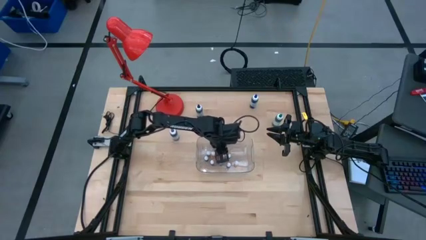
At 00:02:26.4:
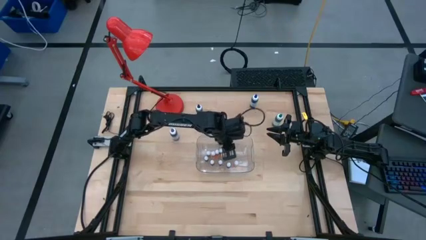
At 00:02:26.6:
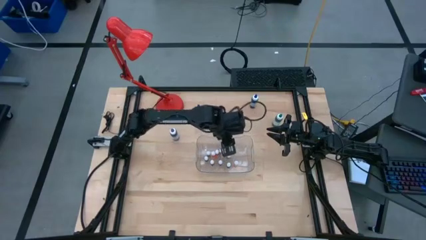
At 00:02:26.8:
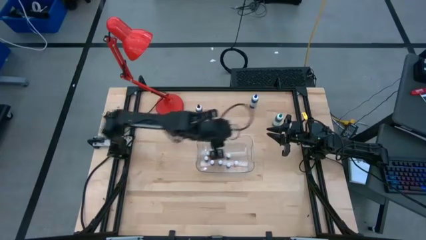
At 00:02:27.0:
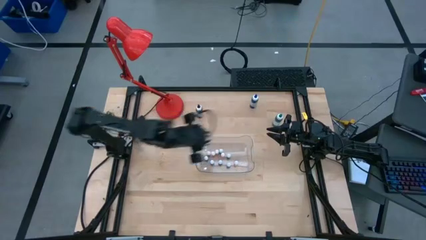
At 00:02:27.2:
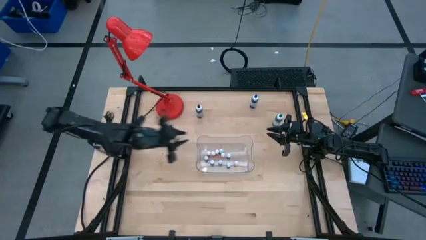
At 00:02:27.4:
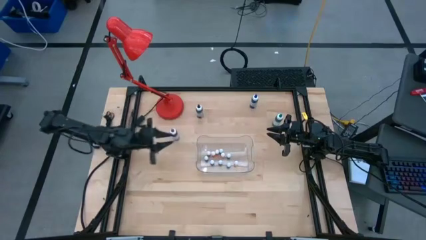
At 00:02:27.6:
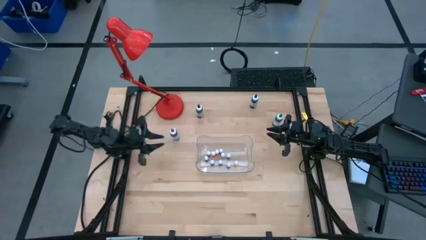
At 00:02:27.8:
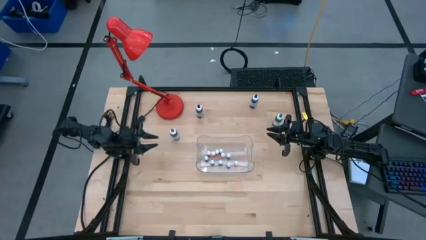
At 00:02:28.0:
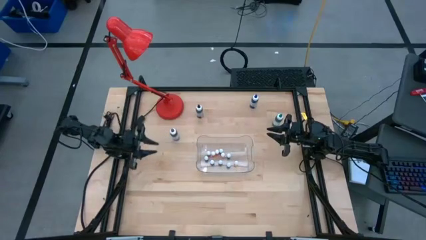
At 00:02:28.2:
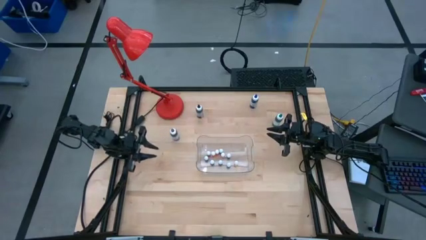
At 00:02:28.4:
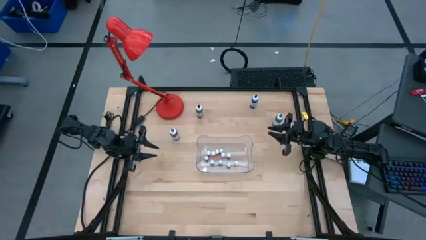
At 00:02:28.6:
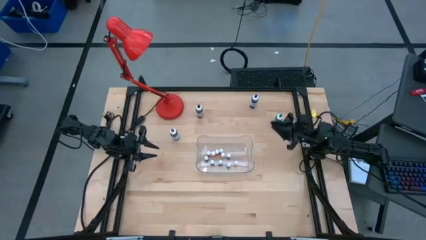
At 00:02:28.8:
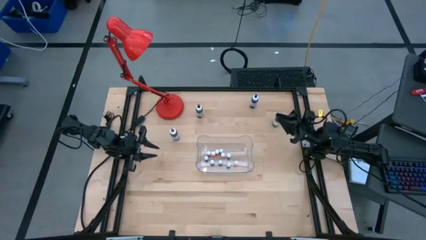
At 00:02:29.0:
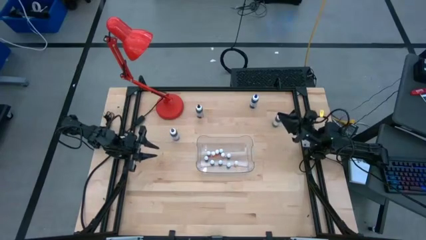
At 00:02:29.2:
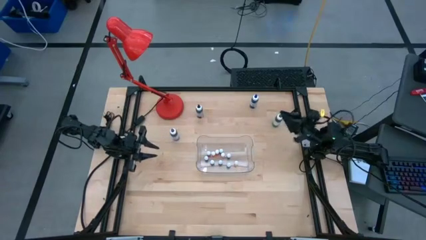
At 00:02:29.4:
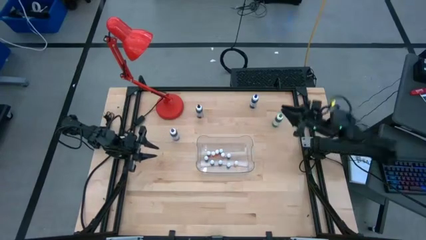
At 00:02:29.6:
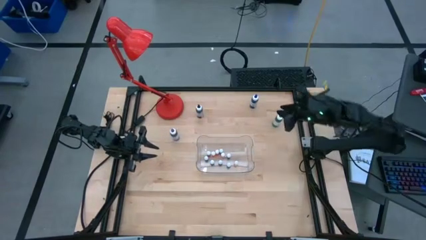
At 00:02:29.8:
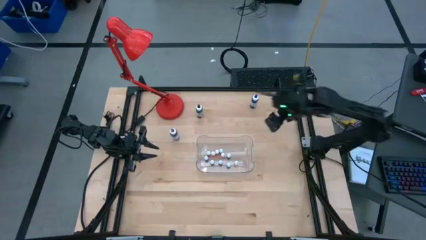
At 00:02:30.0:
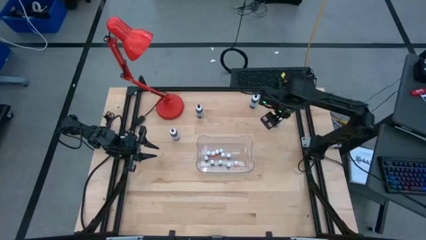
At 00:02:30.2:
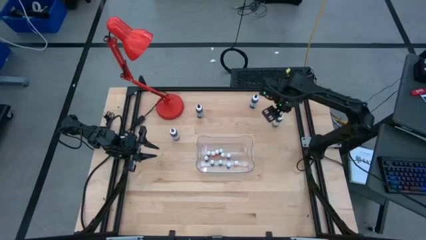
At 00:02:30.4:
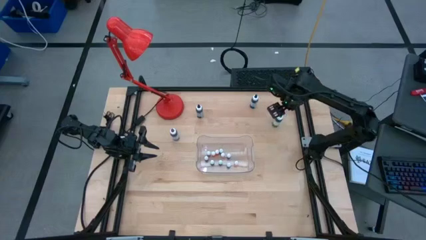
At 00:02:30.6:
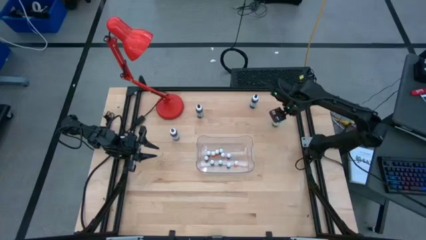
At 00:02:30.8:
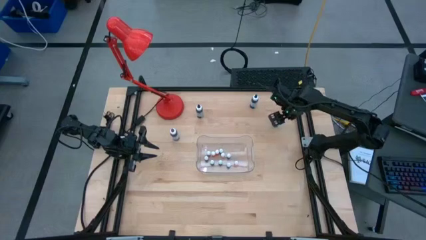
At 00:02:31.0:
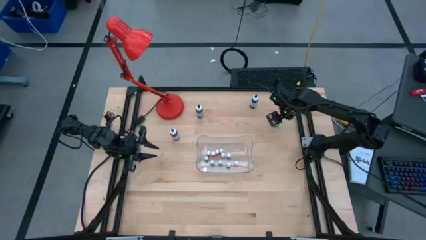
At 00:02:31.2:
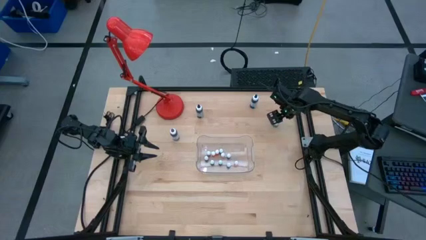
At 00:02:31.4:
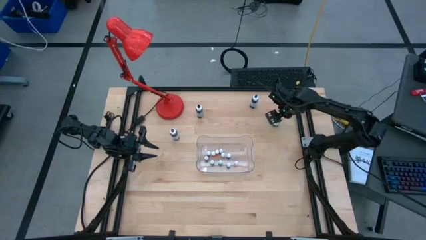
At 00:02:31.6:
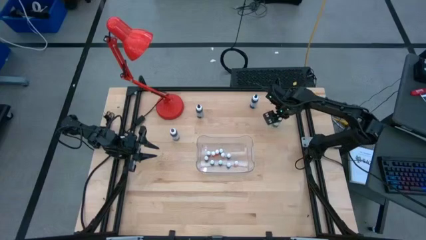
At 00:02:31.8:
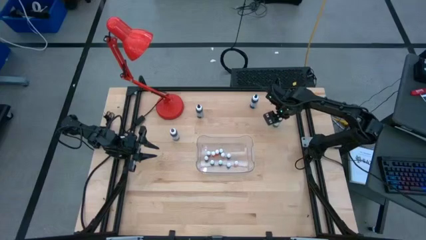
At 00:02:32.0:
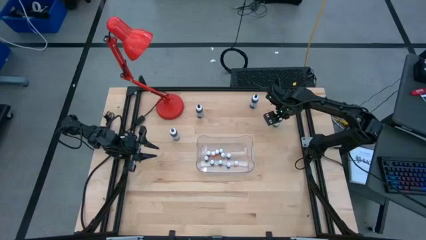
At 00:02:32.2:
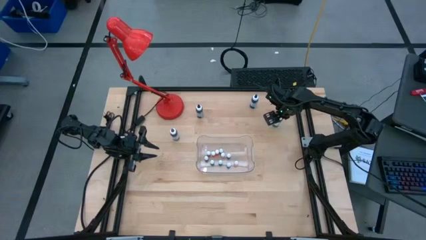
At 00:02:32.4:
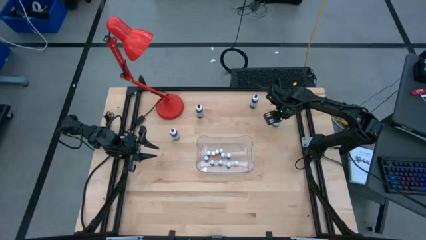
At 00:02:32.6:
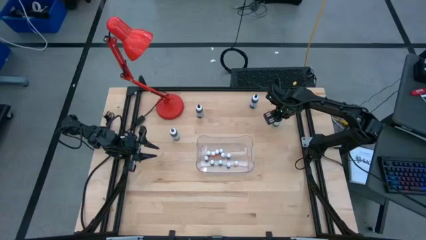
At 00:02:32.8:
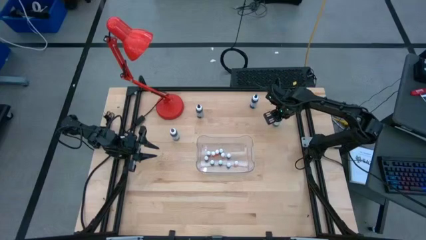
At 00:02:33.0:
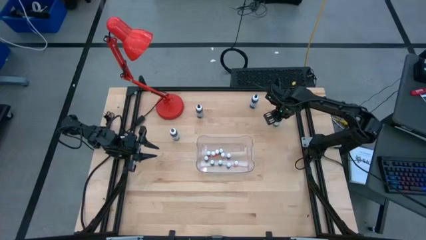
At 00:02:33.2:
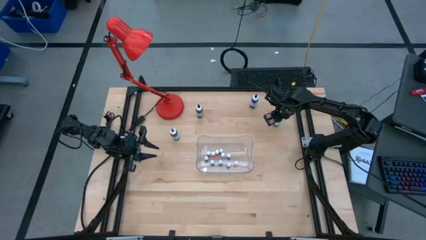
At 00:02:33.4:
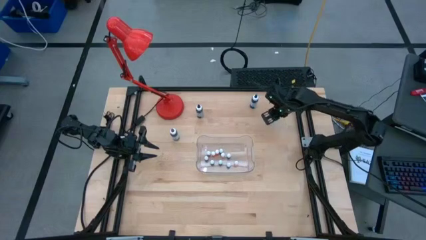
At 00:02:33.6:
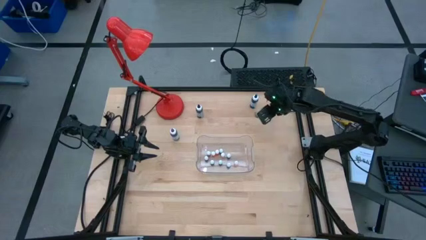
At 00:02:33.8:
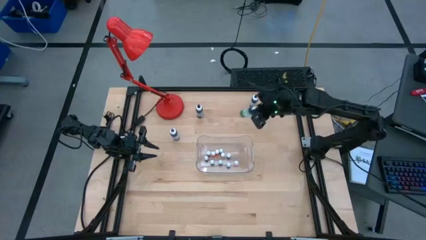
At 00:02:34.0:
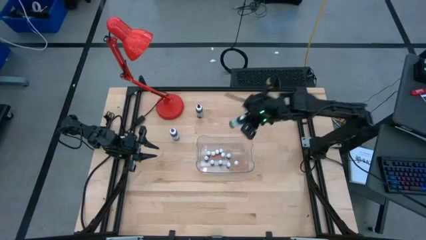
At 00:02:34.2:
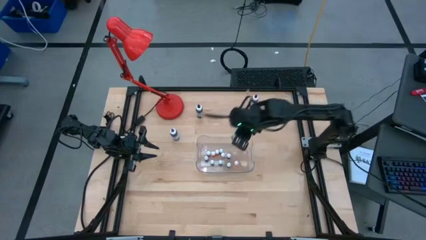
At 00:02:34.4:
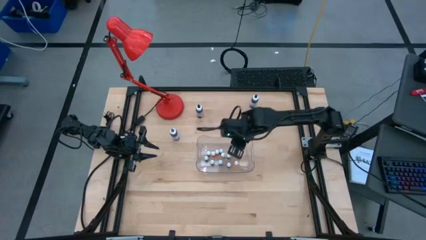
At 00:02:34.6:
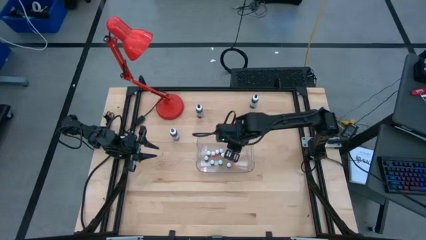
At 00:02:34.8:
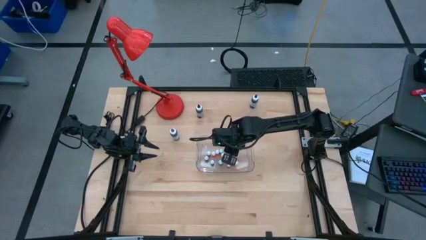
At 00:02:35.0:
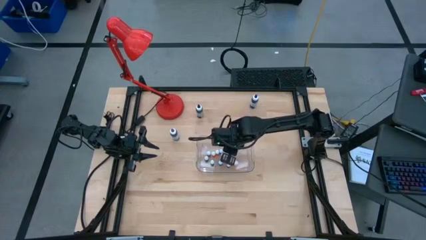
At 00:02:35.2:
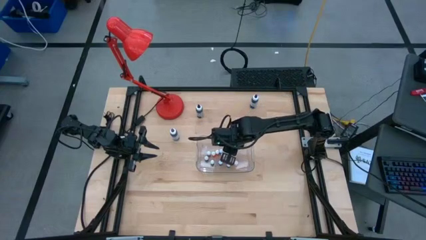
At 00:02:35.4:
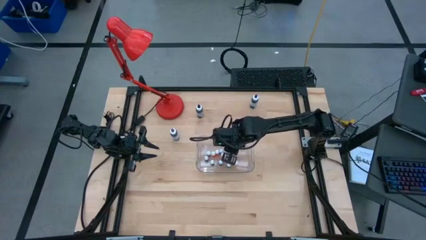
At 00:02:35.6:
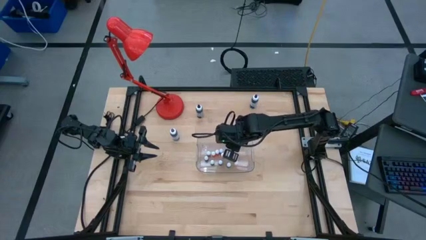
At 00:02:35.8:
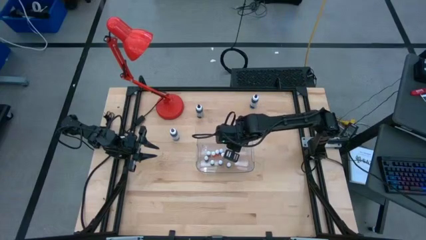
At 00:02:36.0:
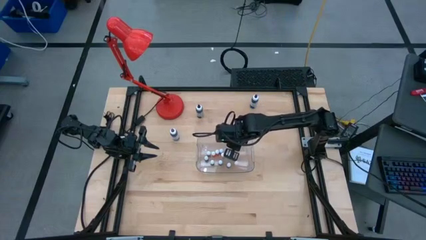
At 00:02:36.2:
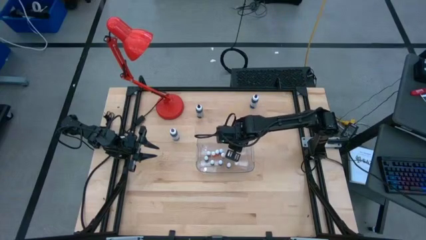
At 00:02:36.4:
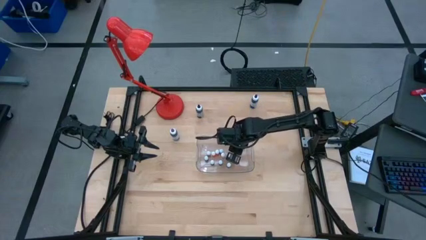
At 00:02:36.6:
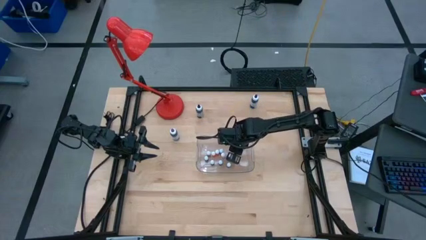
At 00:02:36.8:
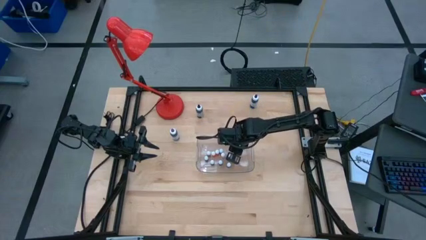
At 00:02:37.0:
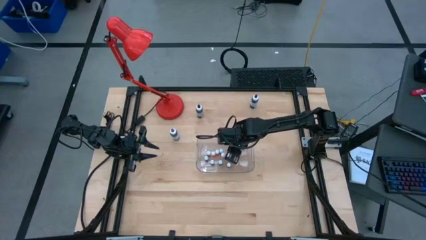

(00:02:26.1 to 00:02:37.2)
Task: Pick & Place food coloring
Put the large green food coloring bottle into the transparent bin
